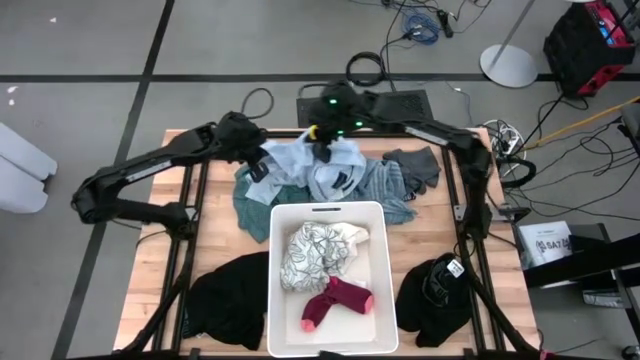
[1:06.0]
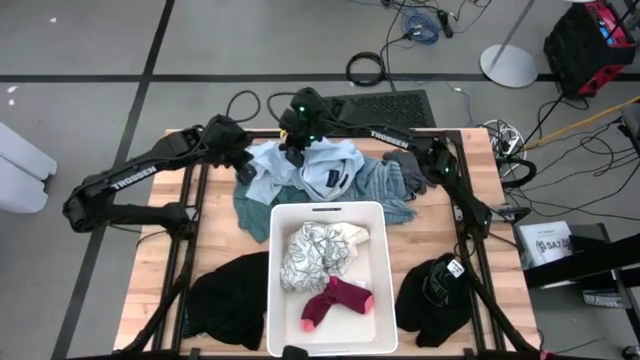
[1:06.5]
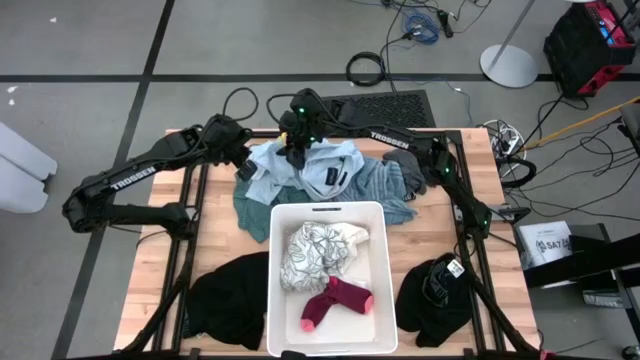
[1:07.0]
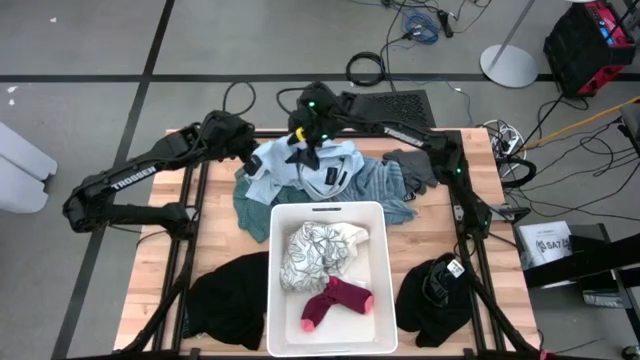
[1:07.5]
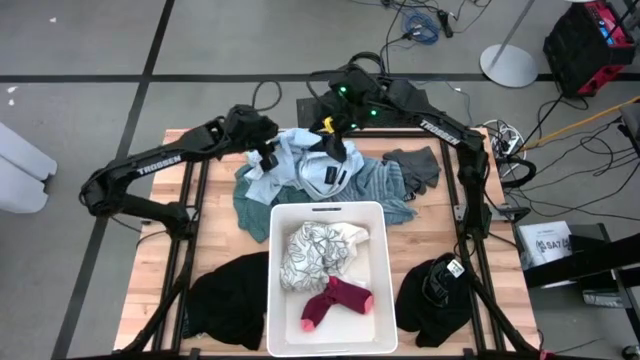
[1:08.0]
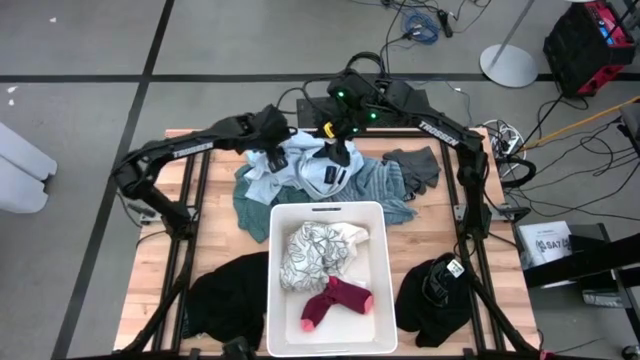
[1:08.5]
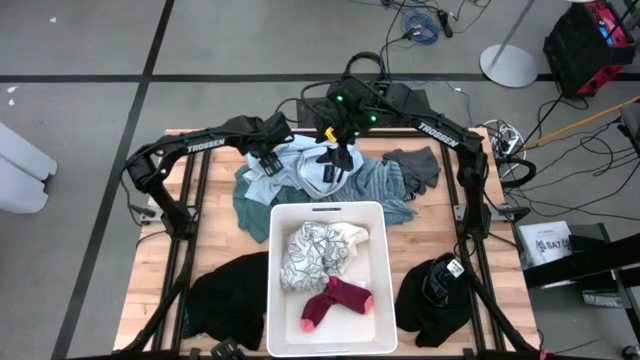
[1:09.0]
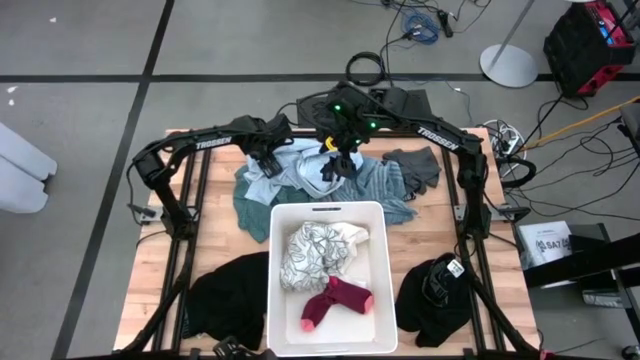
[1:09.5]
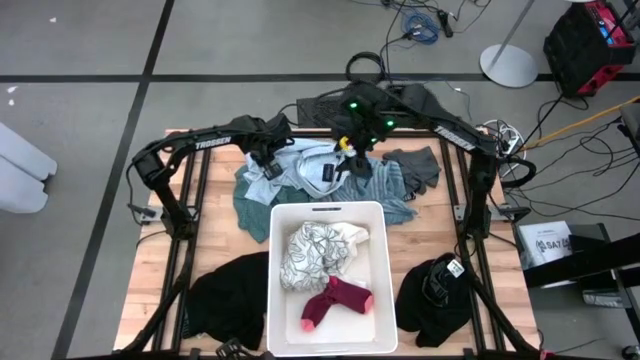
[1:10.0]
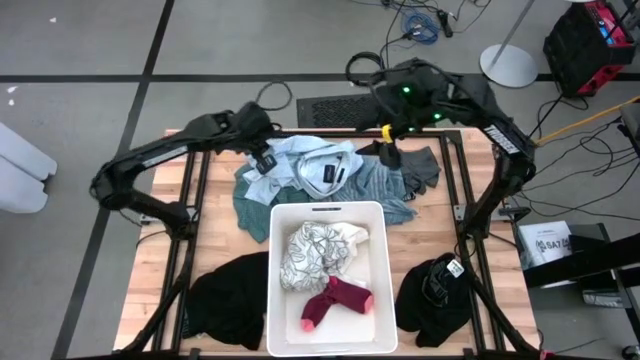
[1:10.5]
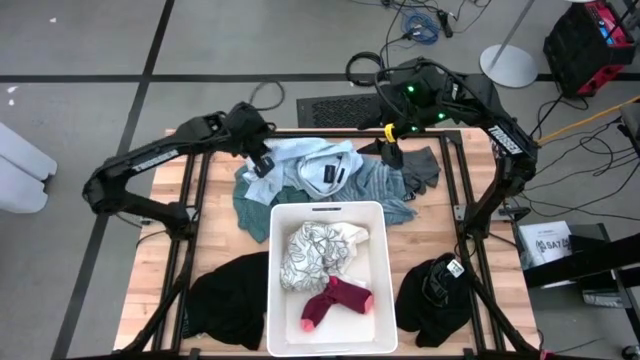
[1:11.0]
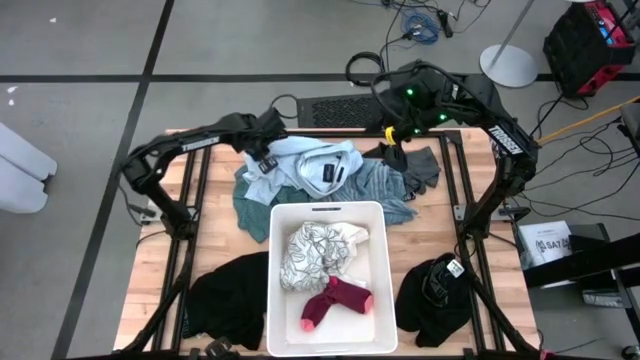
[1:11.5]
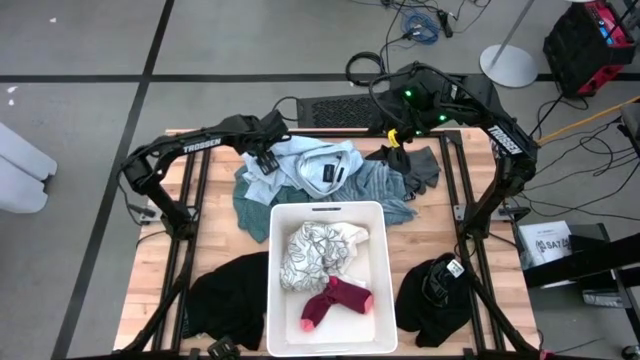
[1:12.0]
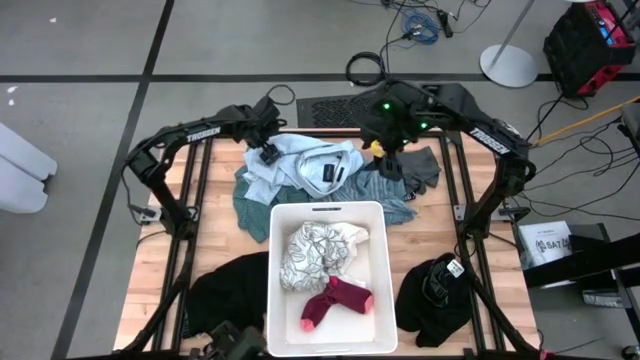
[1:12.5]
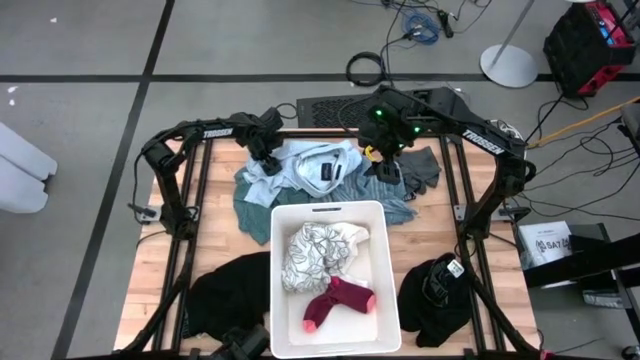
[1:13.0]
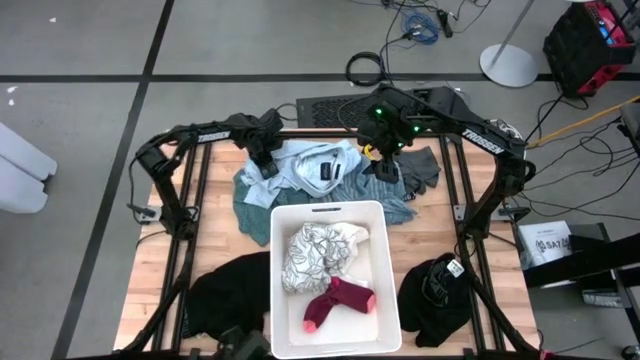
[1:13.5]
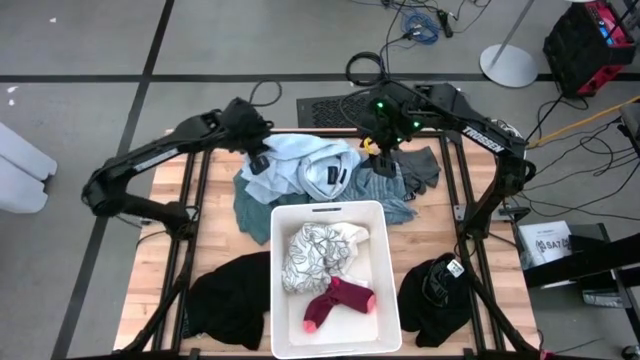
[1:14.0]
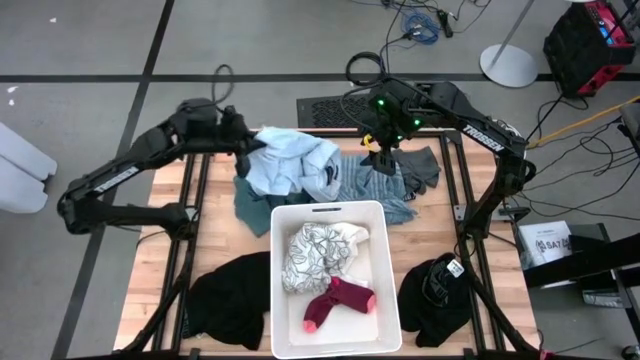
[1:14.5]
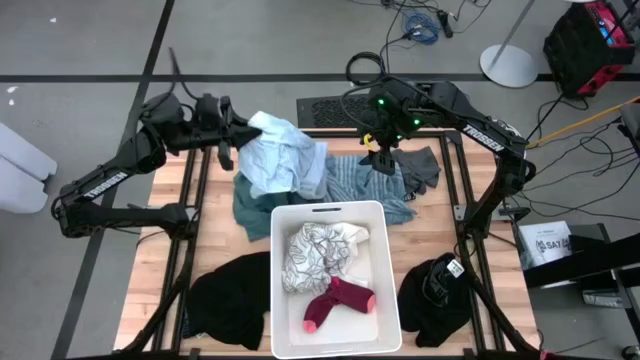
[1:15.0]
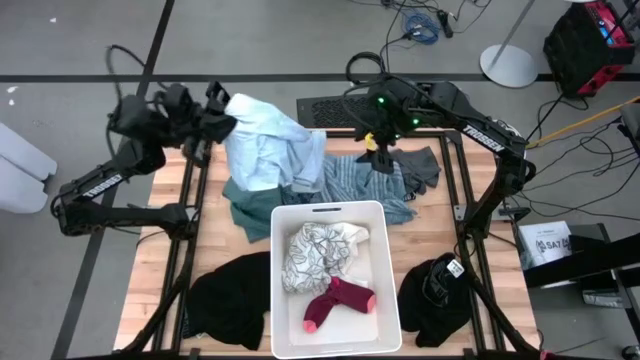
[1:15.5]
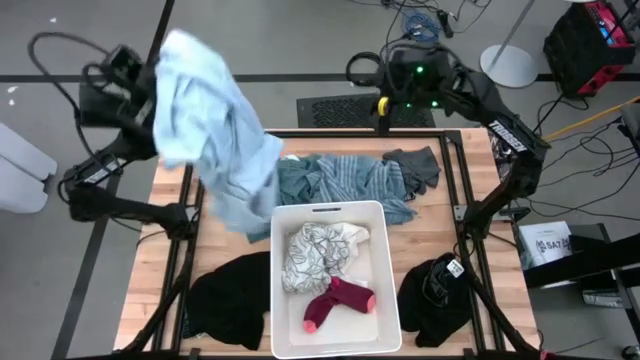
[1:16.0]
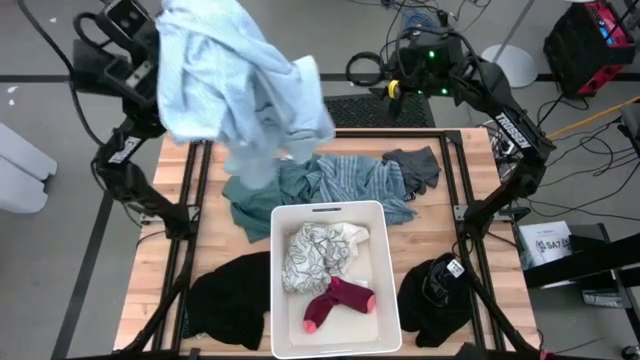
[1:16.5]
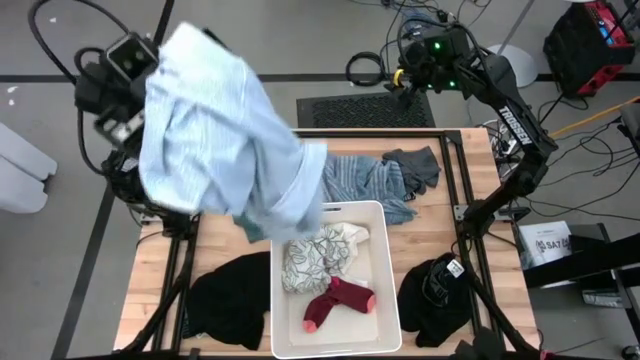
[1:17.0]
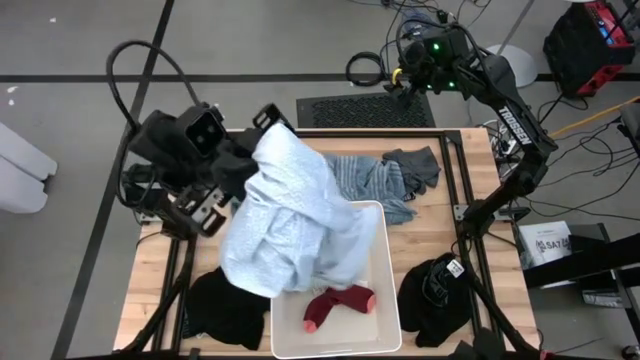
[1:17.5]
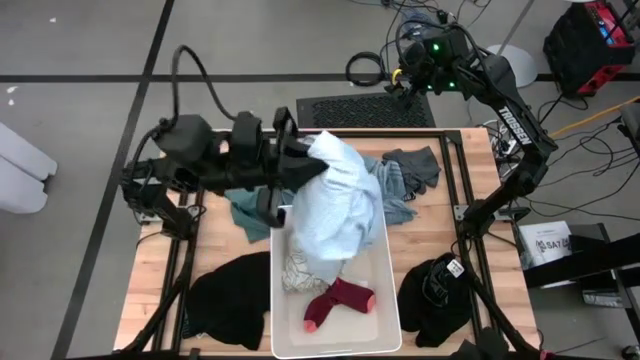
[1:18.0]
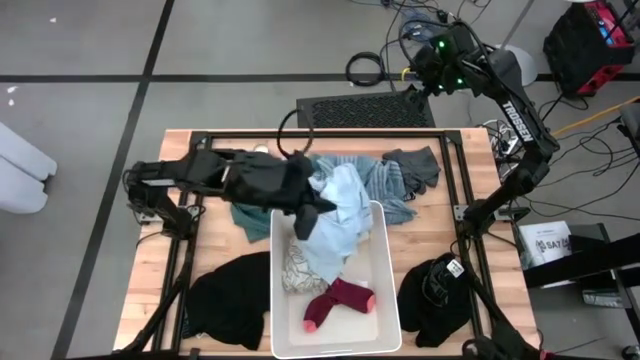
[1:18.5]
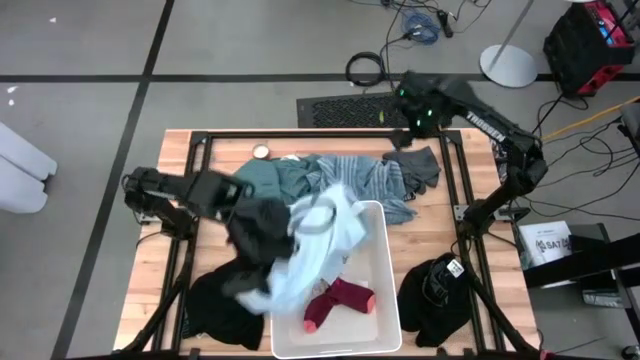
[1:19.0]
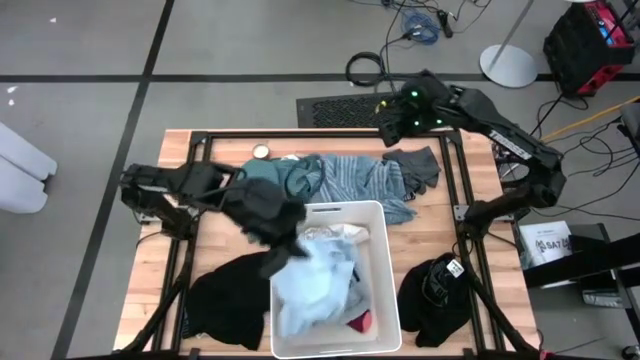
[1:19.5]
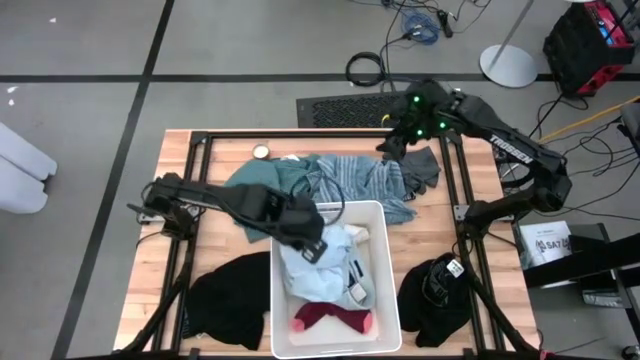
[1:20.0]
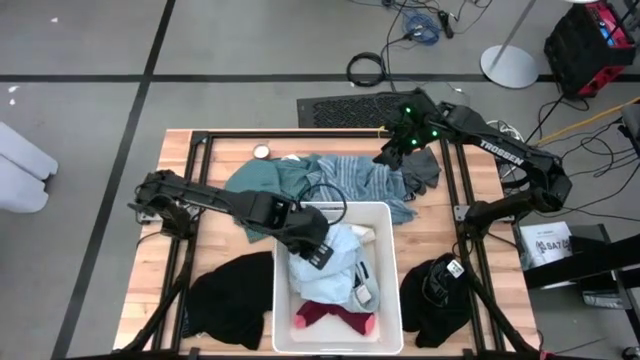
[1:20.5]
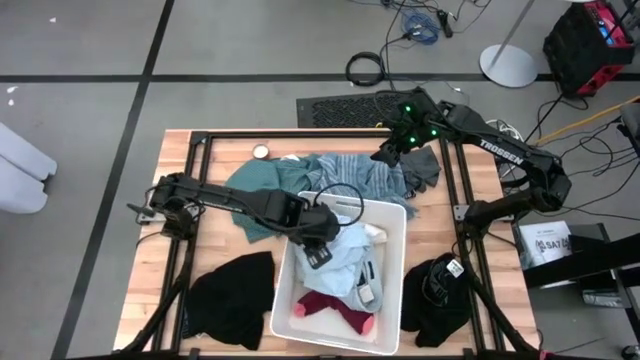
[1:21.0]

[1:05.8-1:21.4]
Task: Sort clothes
Put the light blue polo shirt into the white laundry bin

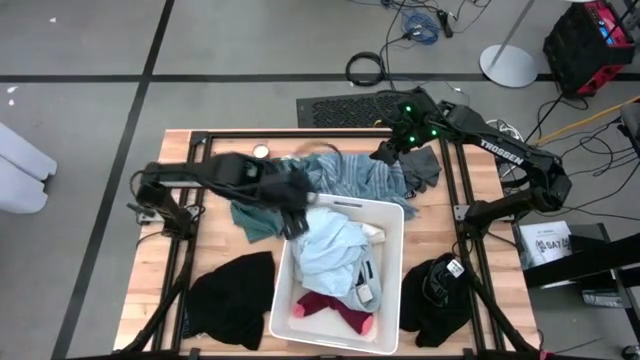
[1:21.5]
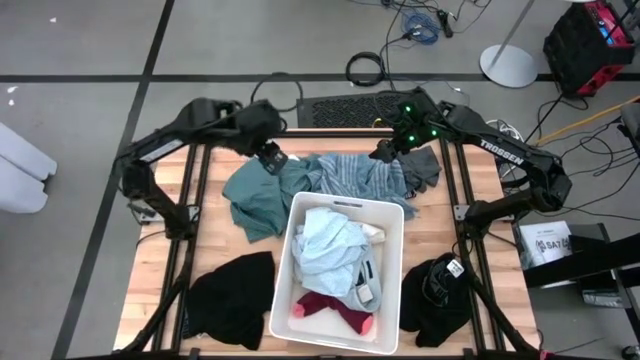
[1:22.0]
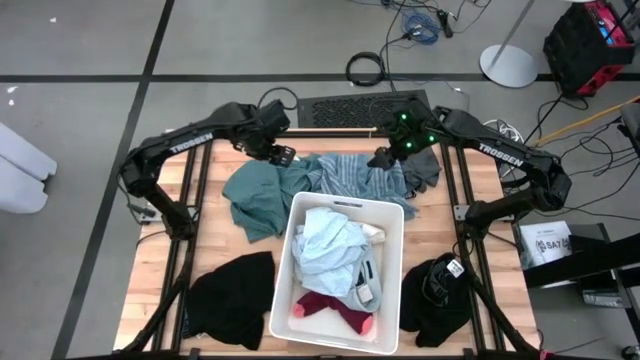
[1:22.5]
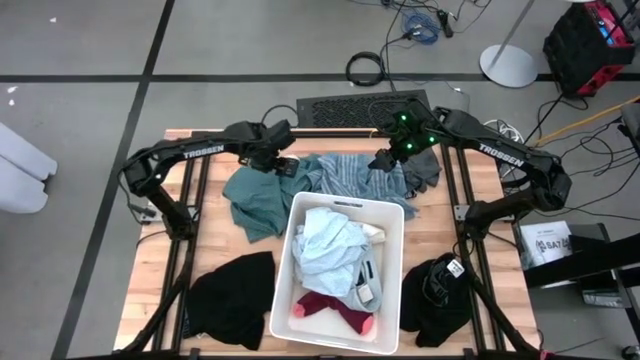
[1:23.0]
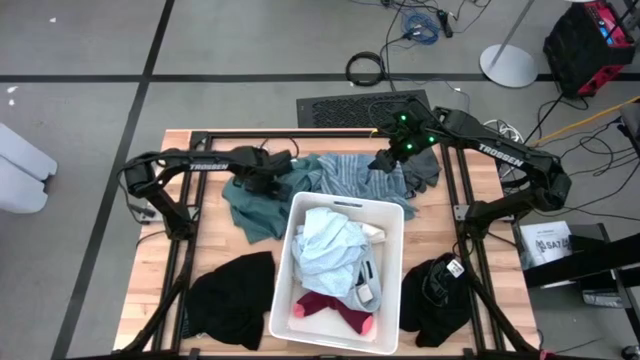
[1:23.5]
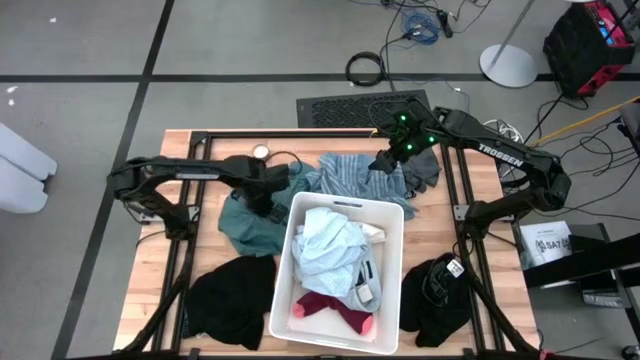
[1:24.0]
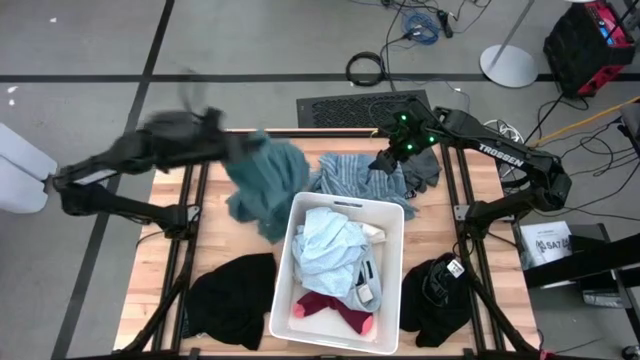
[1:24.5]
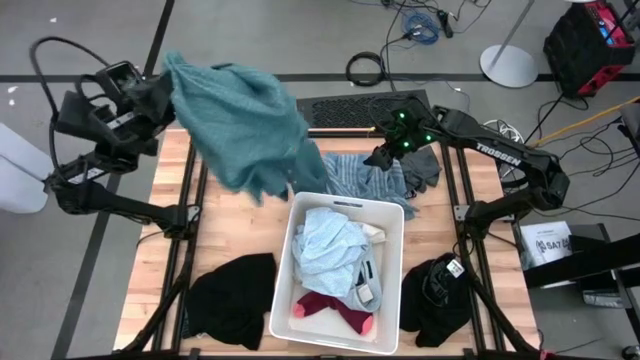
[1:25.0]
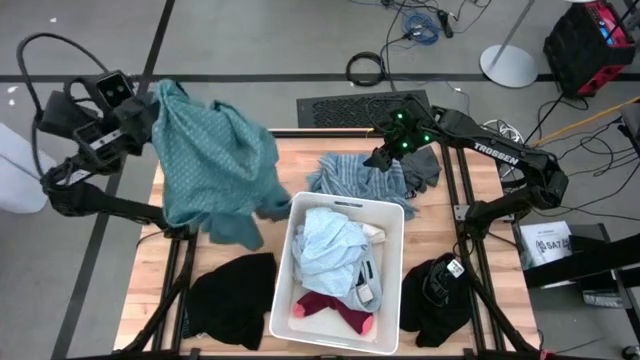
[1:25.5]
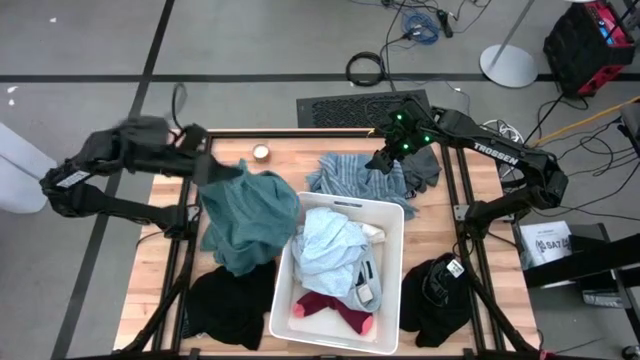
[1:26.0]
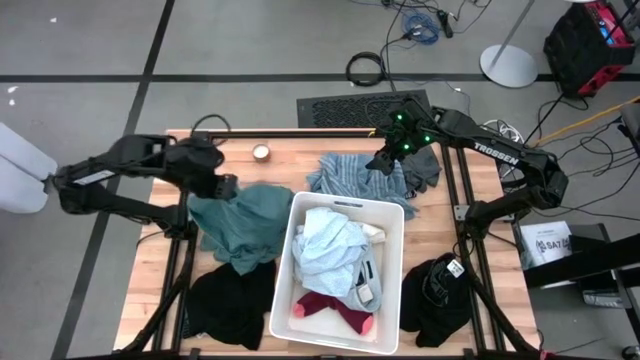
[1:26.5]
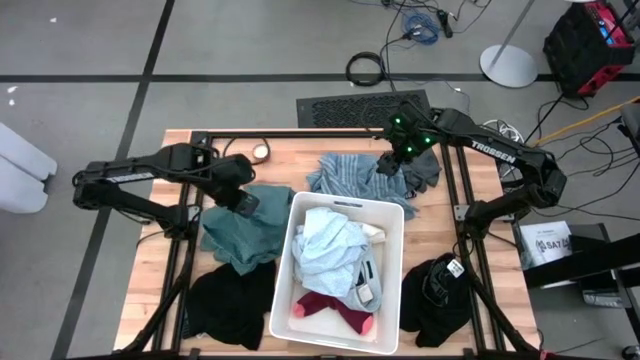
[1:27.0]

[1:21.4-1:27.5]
Adjust the green polo shirt
